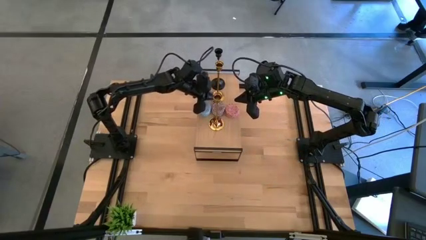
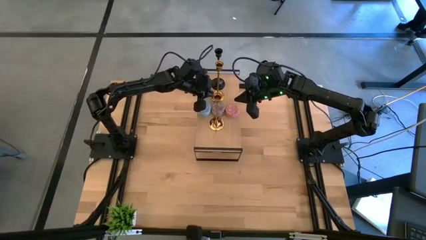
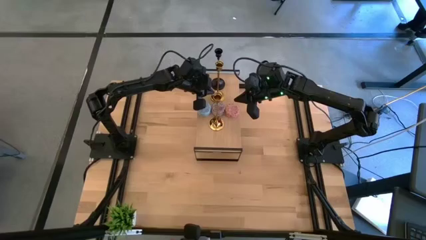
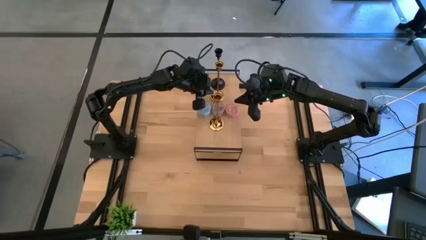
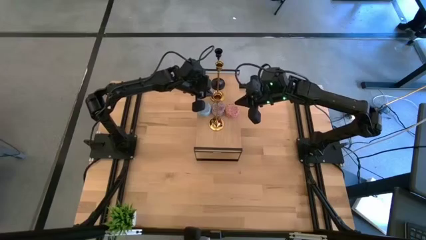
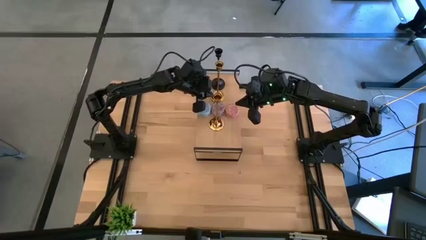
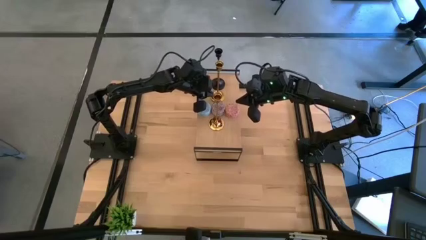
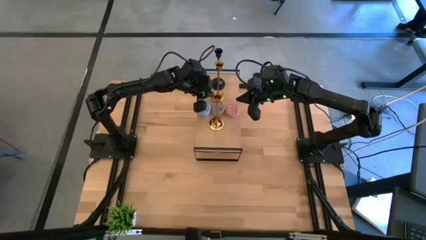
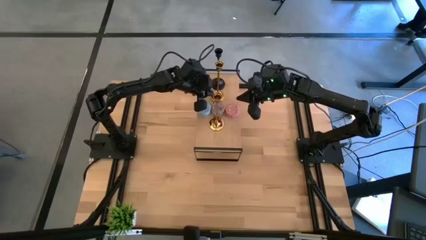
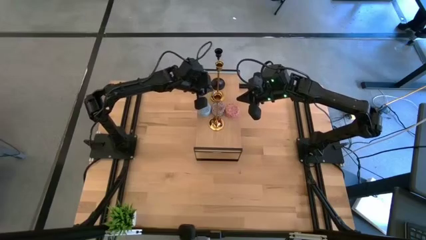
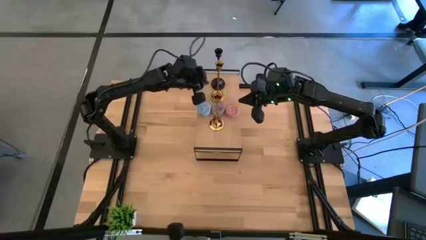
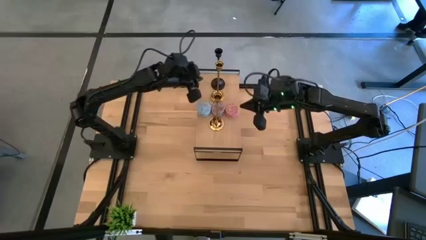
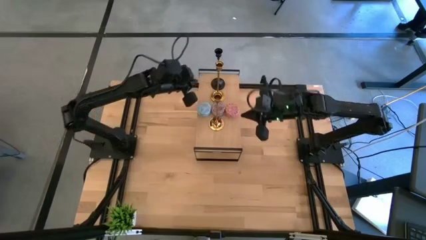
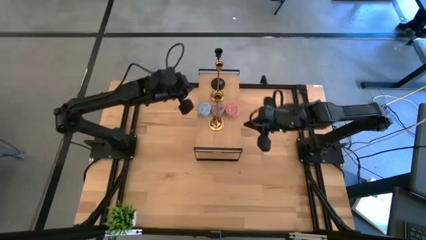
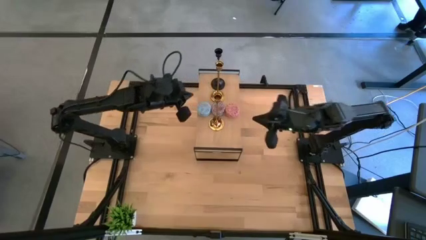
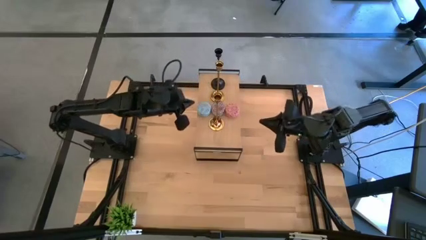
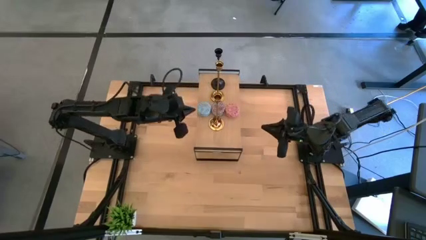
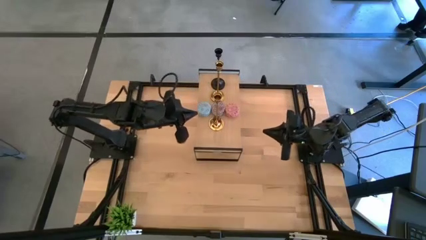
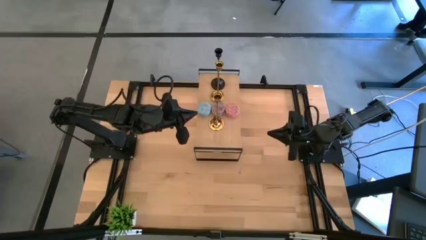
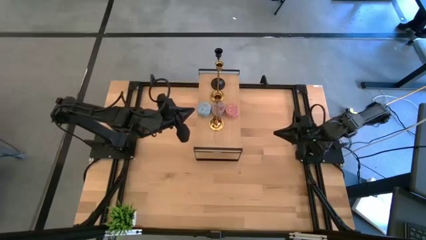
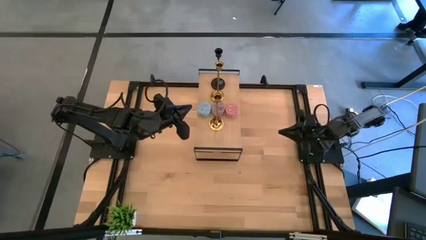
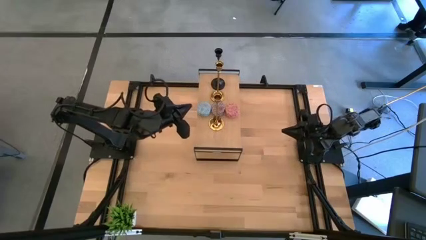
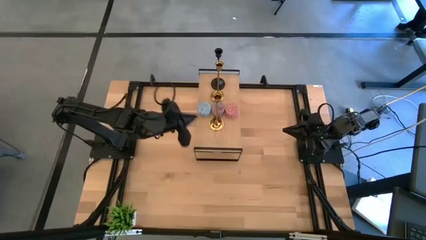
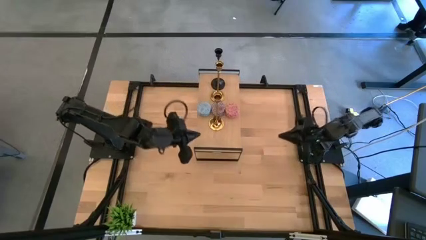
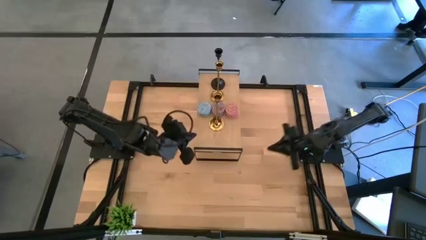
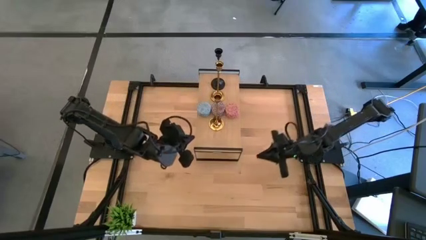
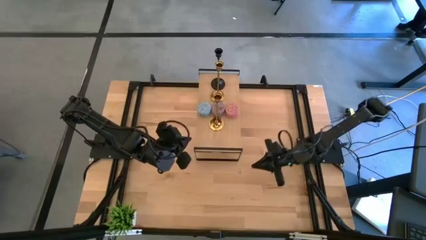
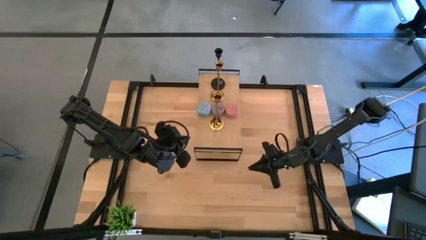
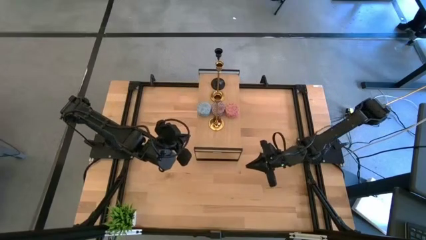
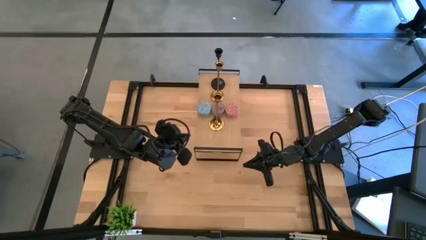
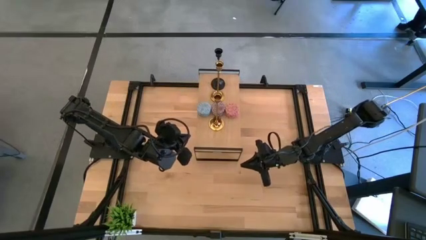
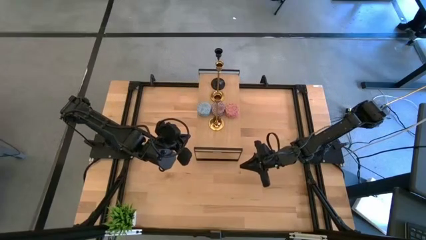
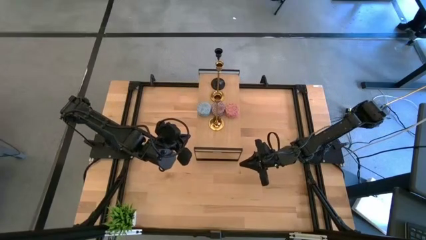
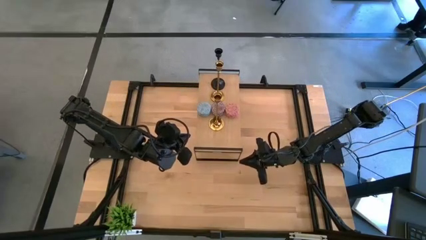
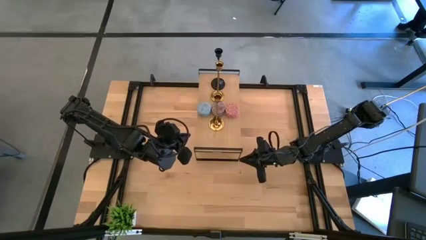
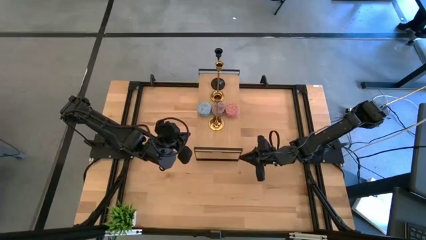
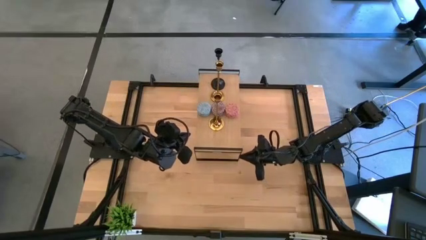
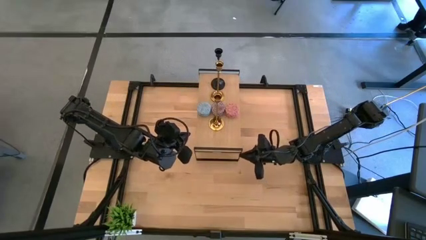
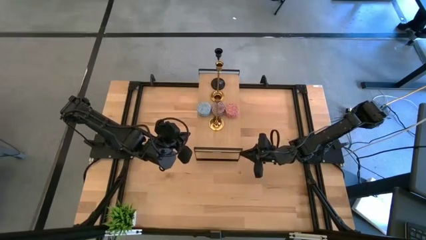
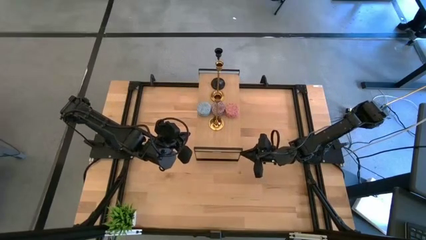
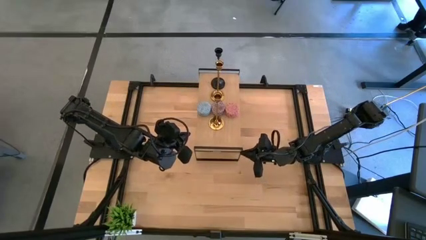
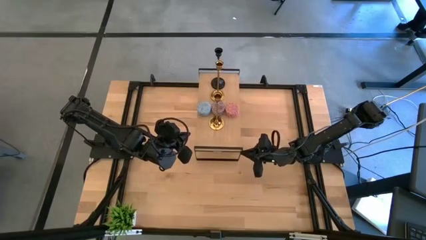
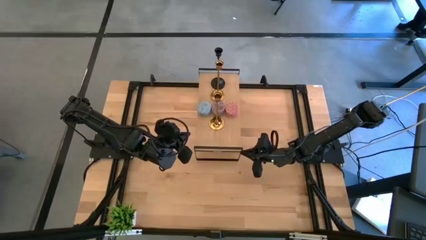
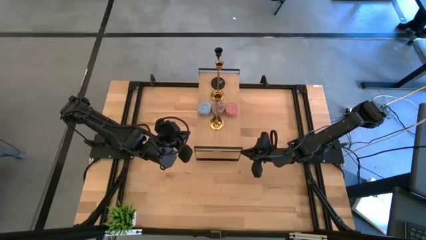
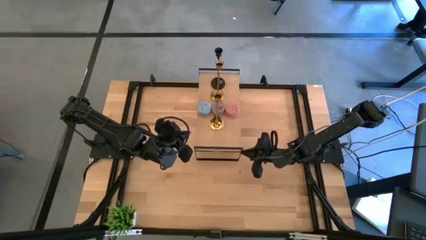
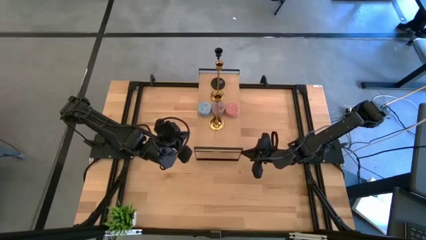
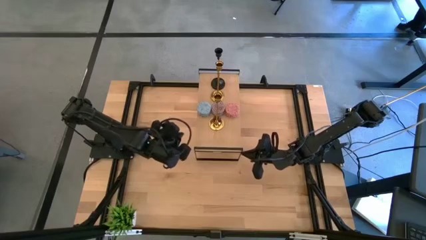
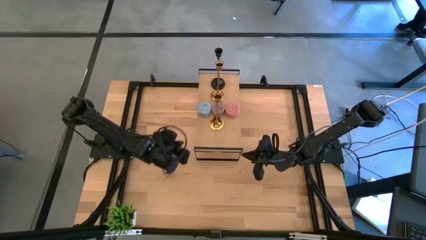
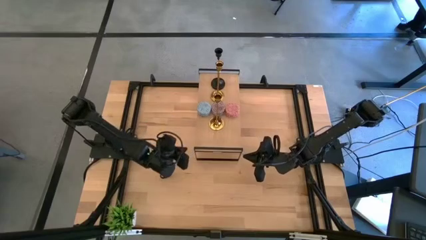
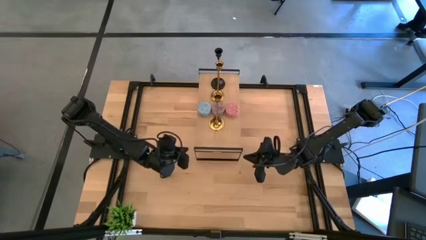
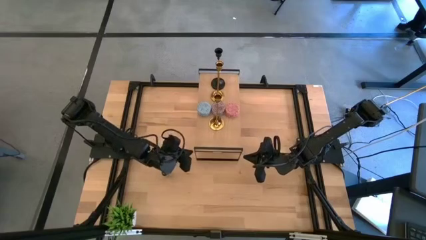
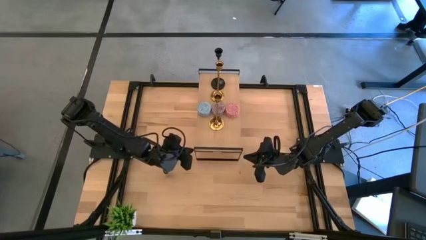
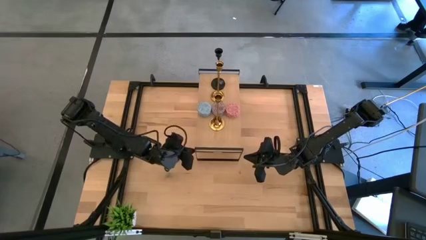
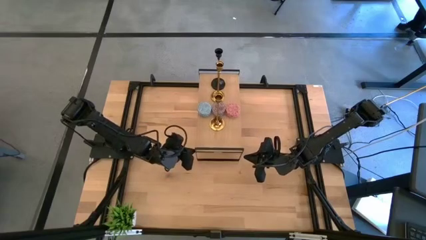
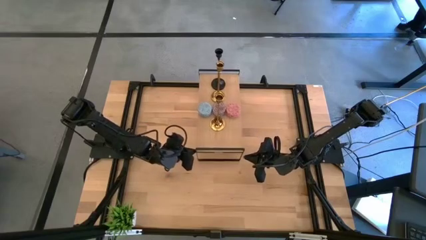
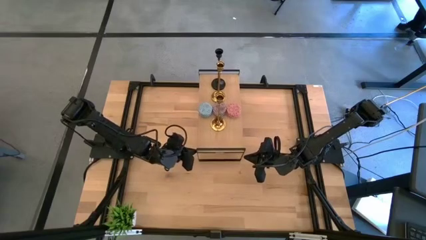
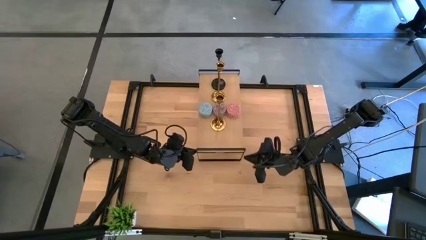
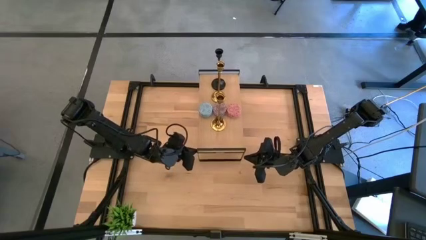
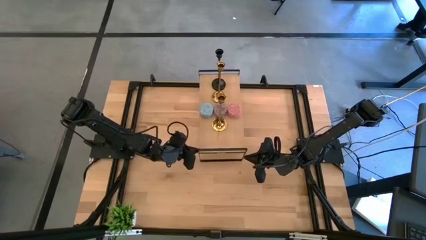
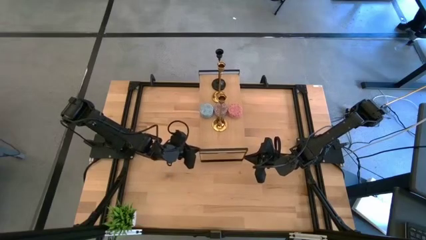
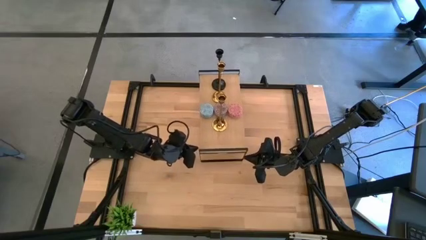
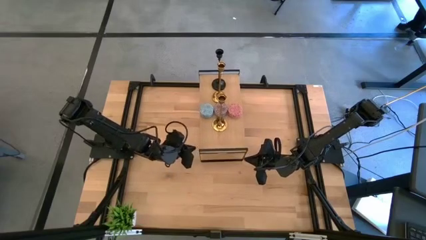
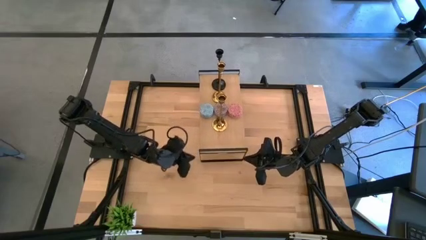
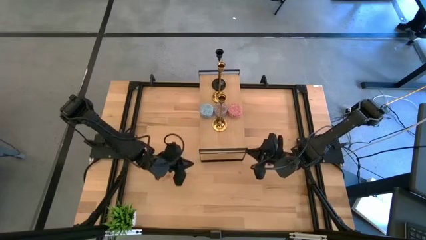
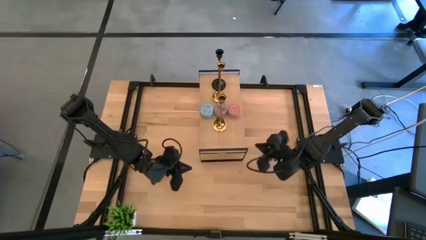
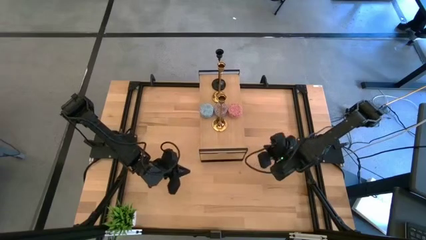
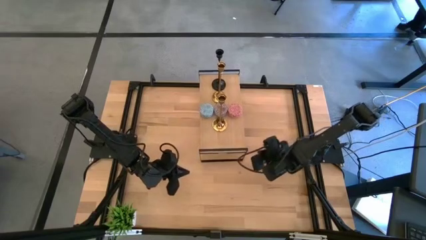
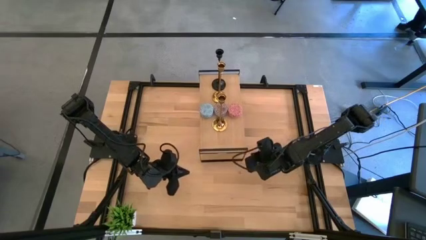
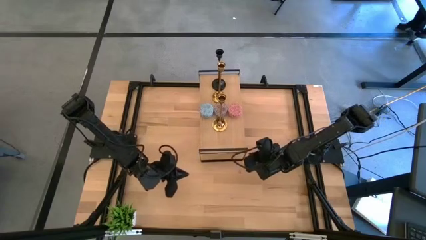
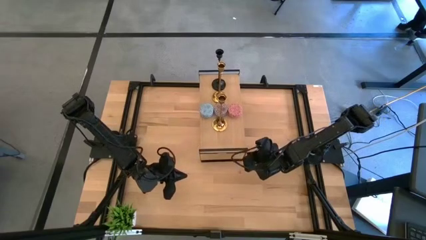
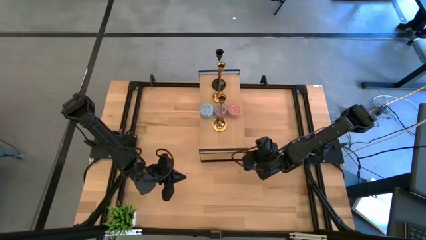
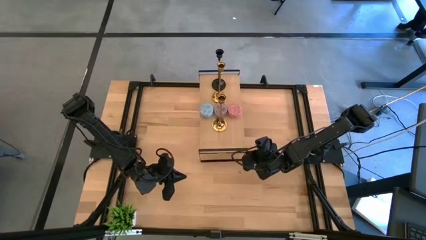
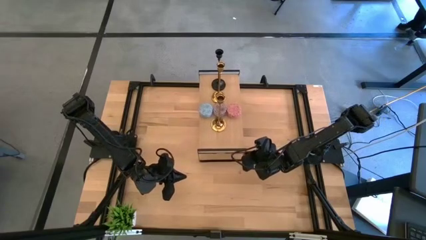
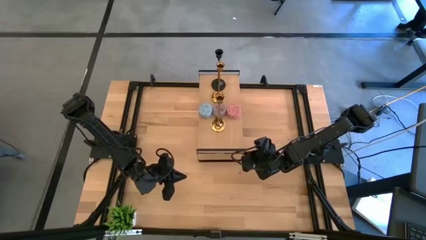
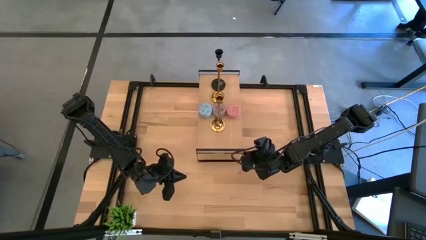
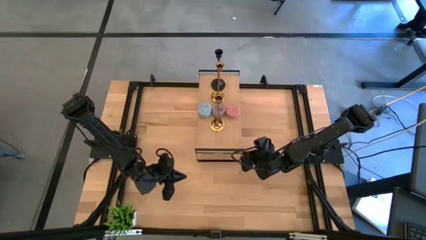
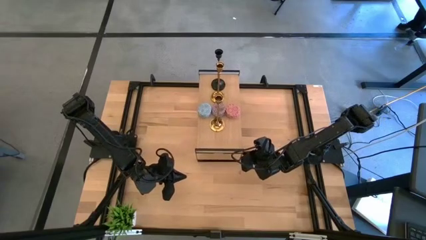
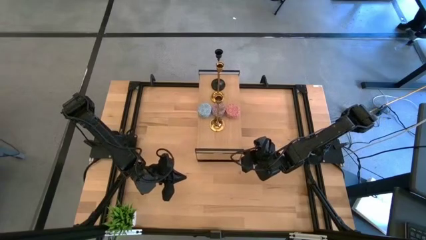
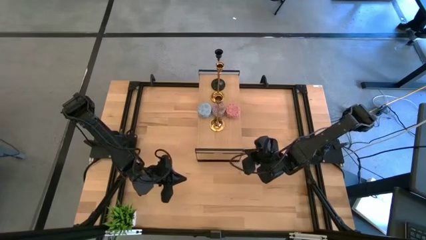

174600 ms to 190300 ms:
Task: Pick & Place candle stick holders
Adjust the shelf
